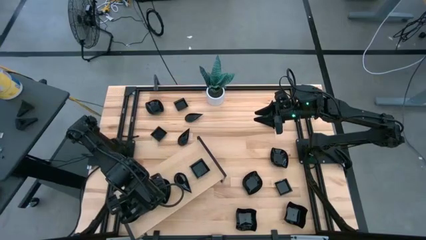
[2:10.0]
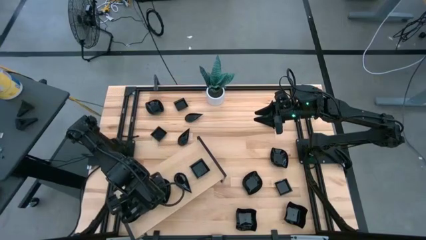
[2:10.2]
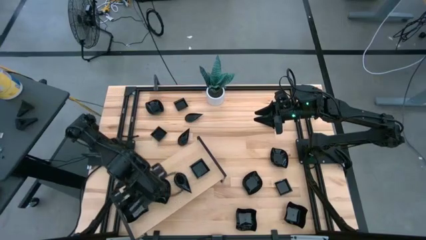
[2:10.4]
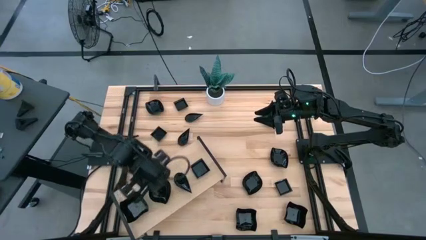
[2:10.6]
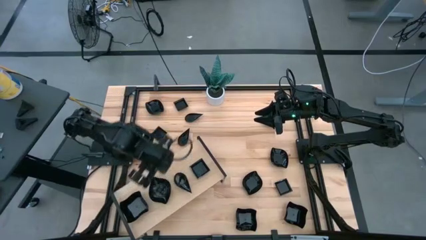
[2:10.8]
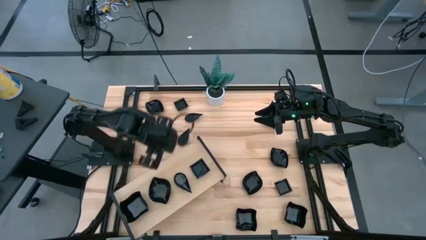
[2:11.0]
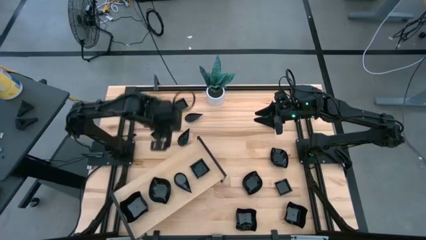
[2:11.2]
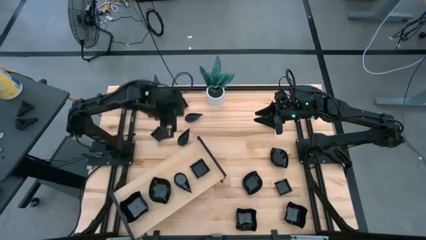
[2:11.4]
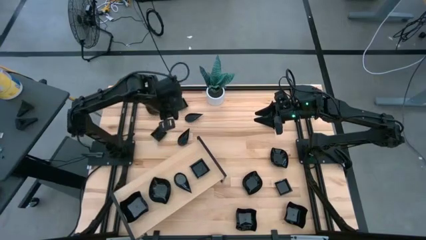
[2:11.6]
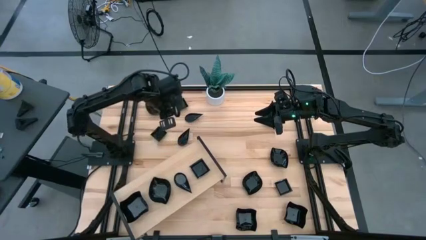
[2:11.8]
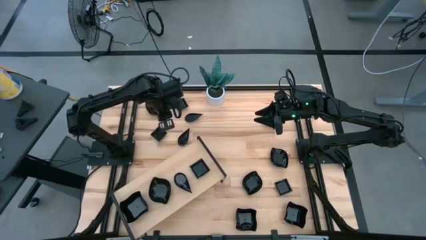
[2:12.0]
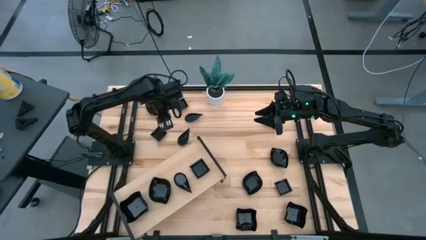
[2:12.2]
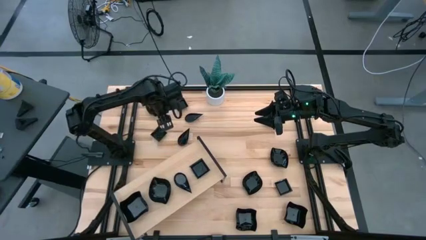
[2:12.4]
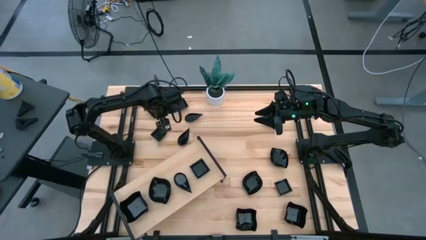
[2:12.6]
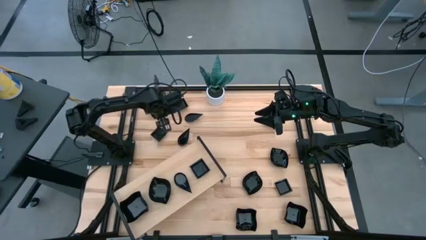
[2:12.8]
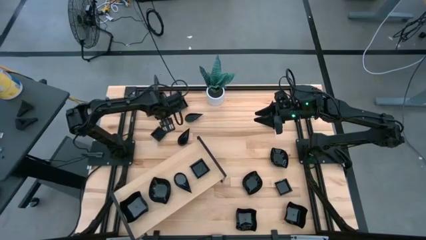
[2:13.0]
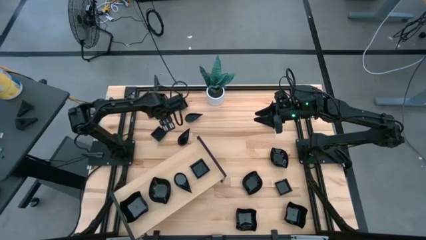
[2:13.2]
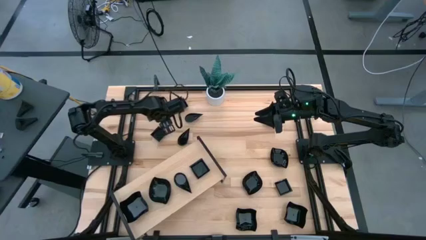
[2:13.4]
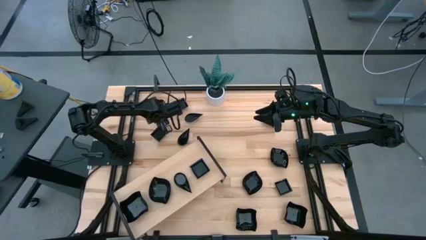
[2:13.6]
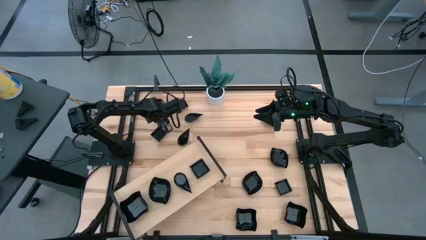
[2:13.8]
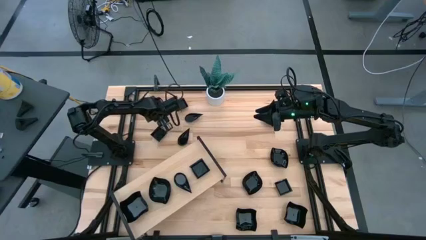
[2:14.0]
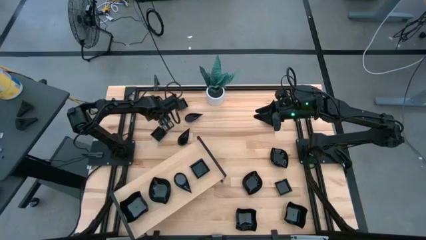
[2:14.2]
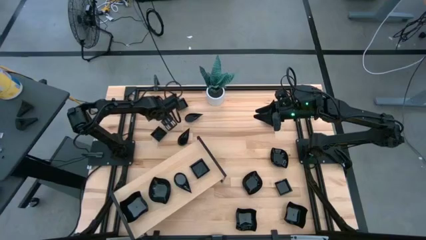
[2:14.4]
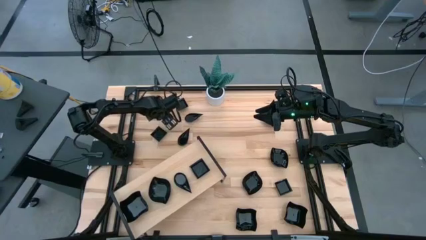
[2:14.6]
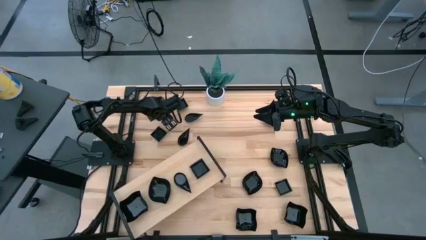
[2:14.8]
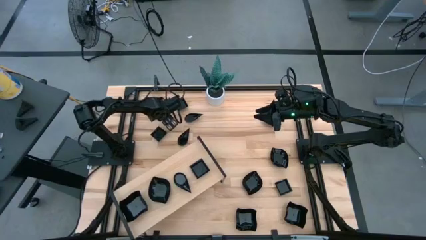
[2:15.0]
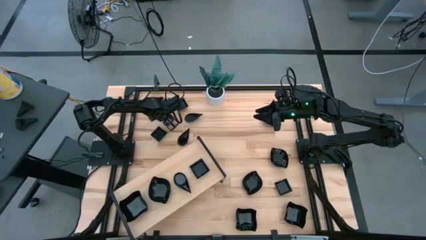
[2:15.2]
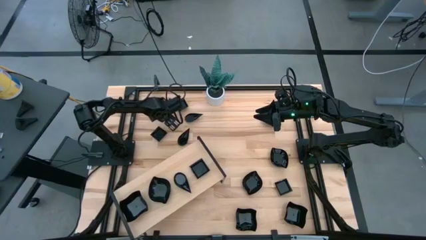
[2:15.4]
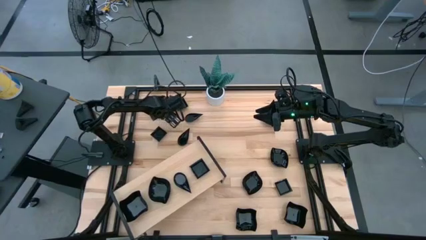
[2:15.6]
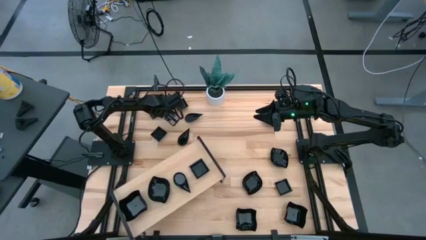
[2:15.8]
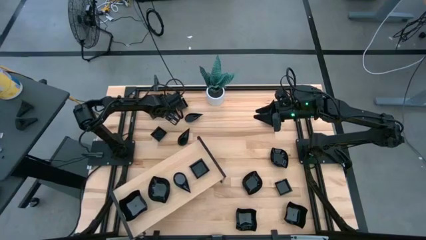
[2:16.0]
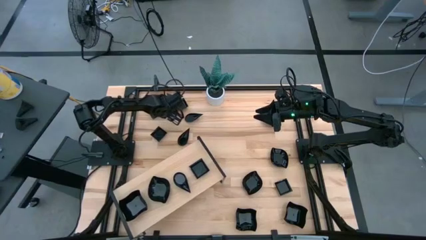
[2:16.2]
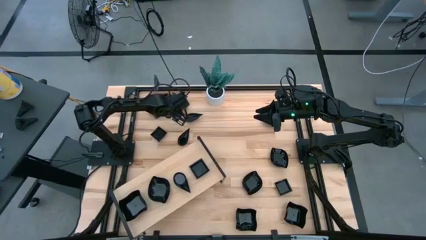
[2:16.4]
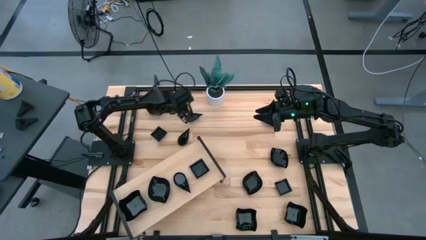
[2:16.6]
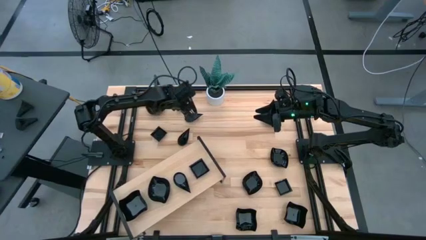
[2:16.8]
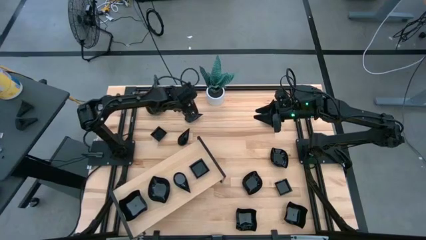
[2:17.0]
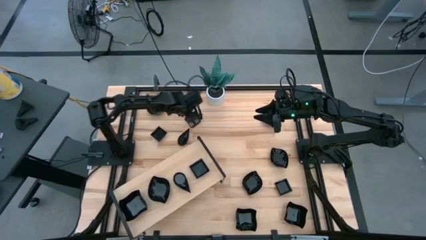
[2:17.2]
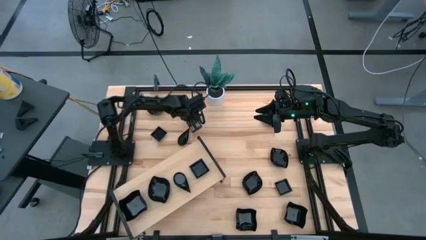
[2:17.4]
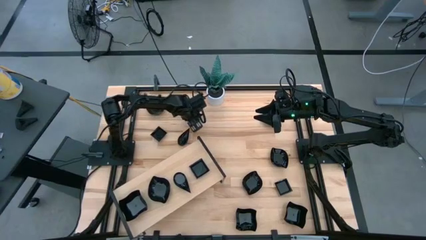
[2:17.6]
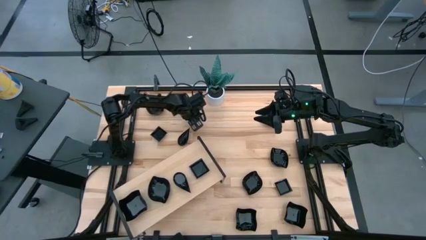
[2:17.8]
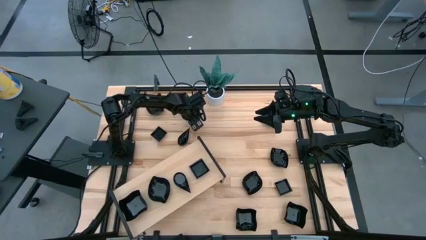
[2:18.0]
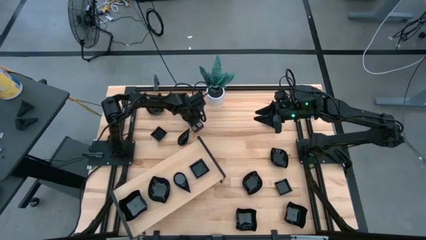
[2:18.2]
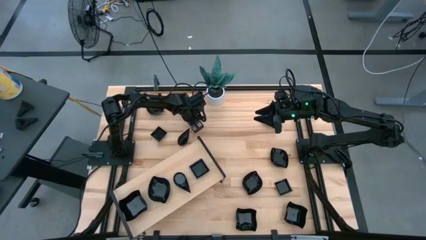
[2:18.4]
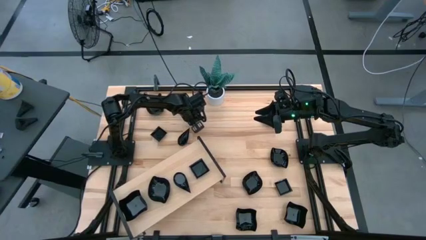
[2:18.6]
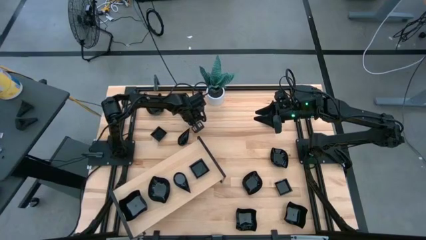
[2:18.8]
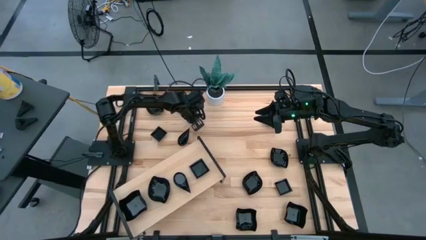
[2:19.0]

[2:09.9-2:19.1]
Task: Pick & Place Mini shaped plates
Stack the black drop shaped plate on top of the black drop shaped plate on the shelf

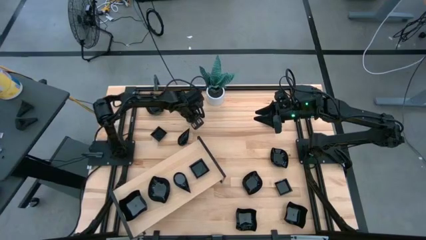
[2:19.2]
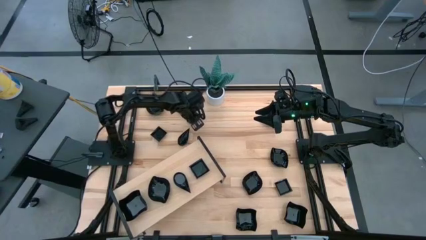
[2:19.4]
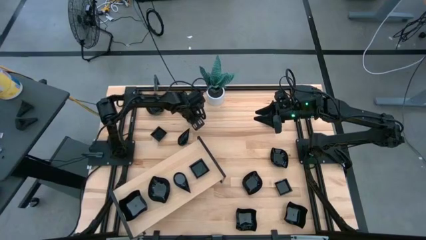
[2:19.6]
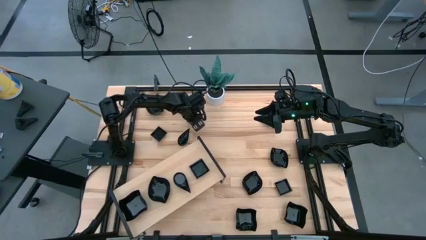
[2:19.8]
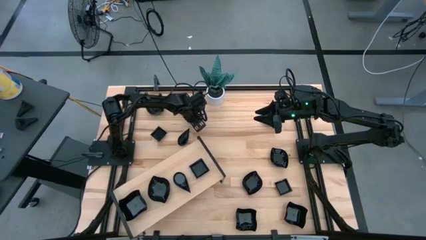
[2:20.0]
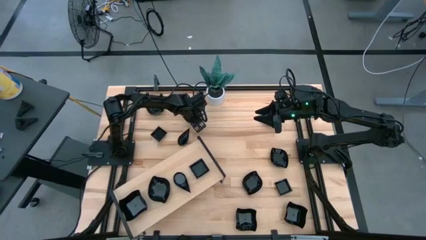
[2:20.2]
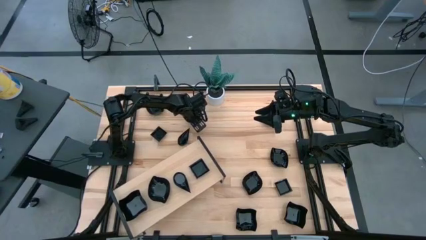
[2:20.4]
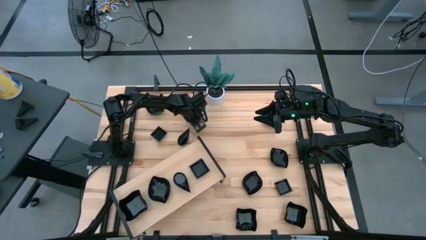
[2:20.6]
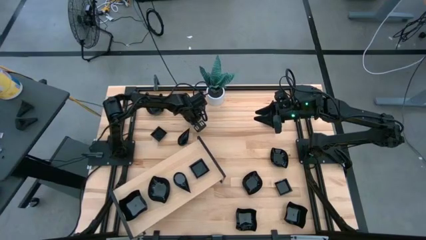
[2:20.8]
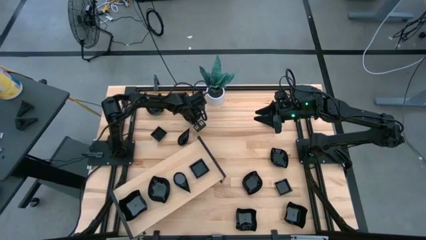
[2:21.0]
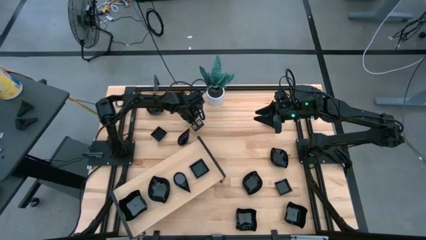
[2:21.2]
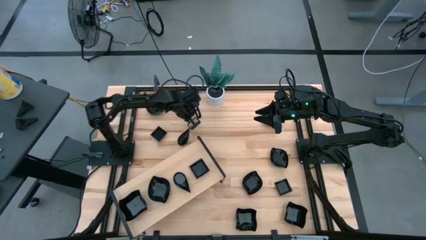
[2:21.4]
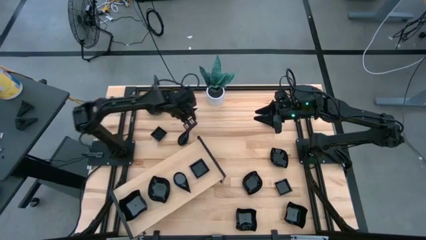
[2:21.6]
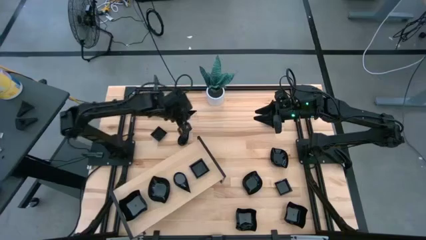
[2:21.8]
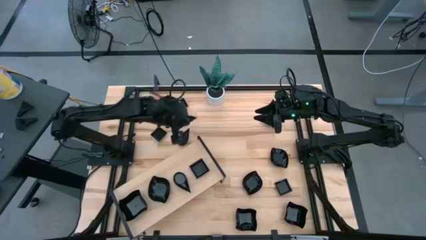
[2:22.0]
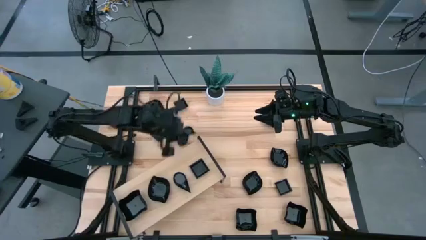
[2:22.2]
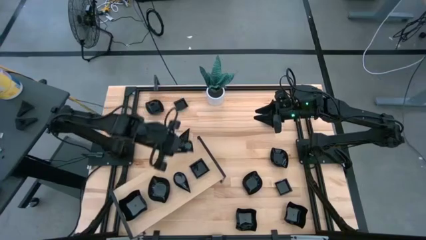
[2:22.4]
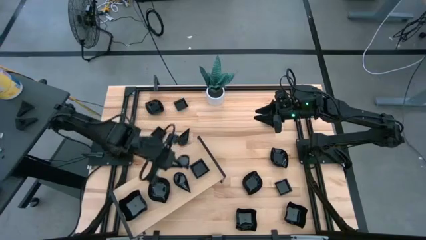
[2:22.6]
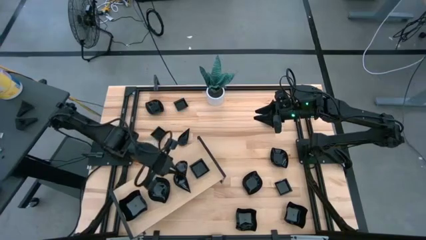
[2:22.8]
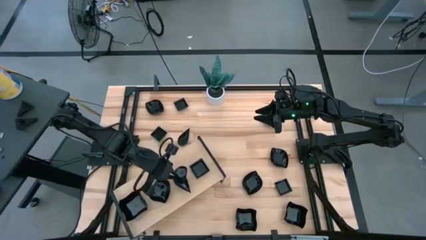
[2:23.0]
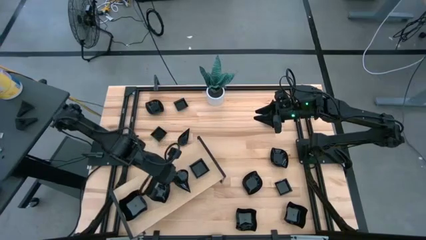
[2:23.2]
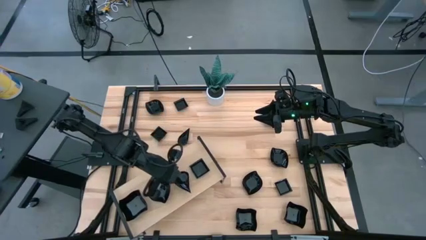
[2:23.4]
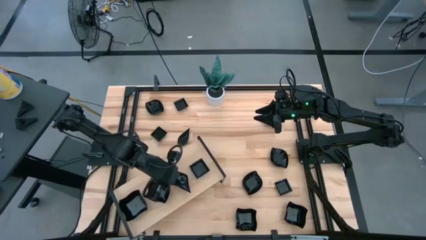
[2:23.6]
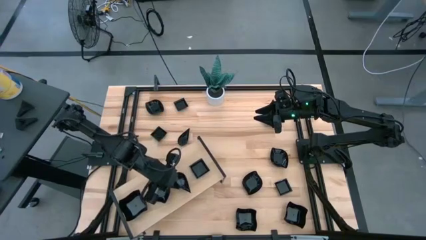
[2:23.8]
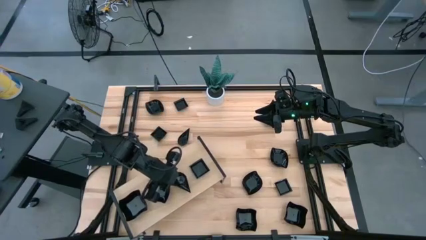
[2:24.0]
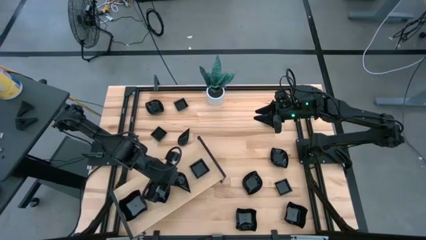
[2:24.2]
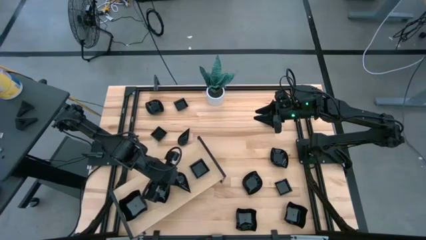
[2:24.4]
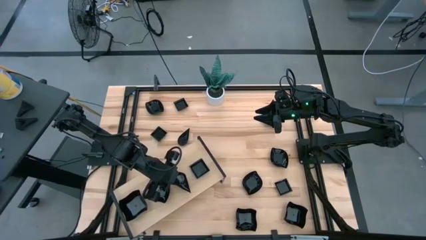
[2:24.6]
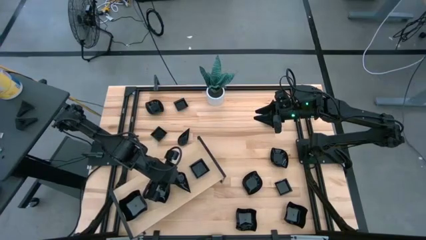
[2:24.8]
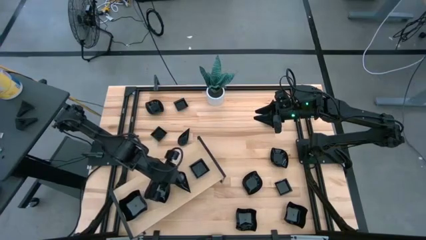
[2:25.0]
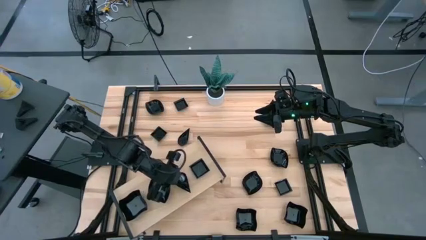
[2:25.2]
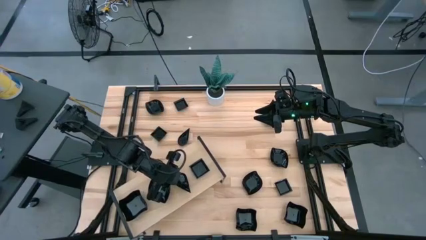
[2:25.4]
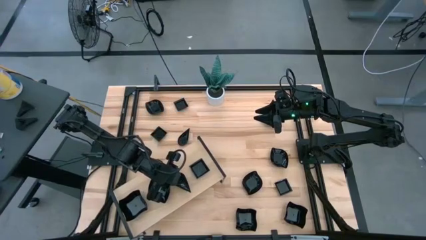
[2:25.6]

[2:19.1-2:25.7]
Stack the black drop shaped plate on top of the black drop shaped plate on the shelf
